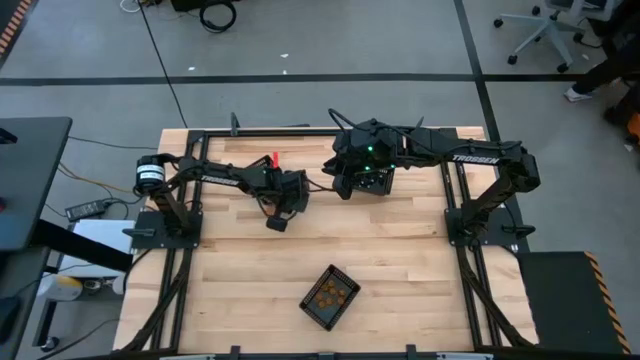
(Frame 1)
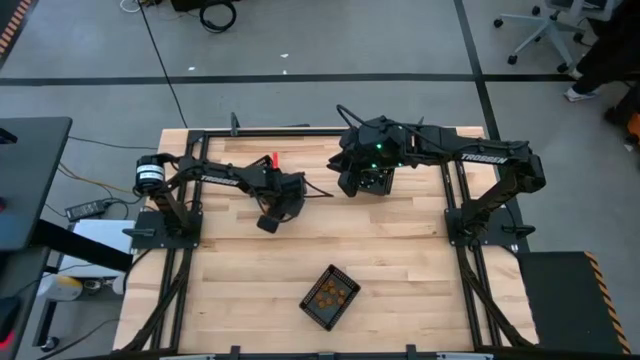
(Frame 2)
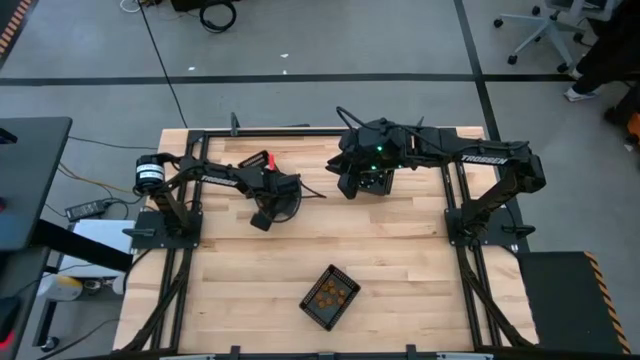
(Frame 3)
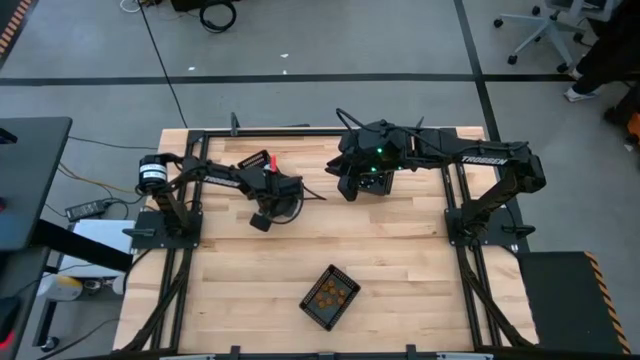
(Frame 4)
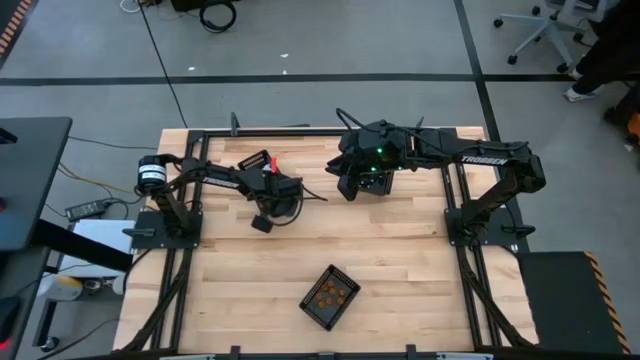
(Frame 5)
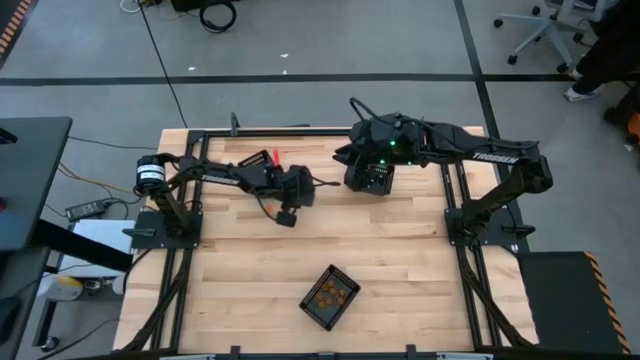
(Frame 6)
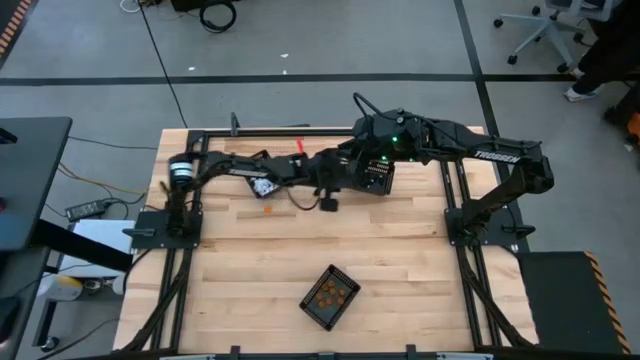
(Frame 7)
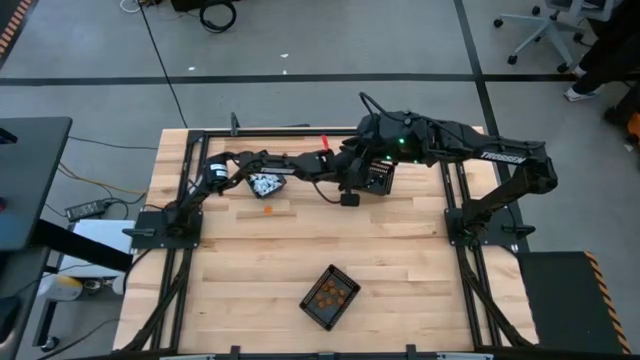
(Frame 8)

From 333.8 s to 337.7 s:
Task: Sort Halloween decoration
Put the black skeleton toy into the top right black basket

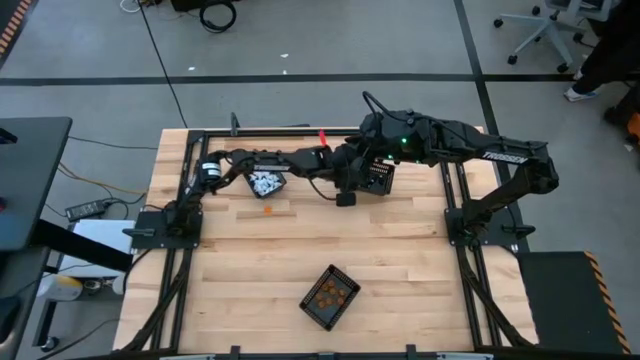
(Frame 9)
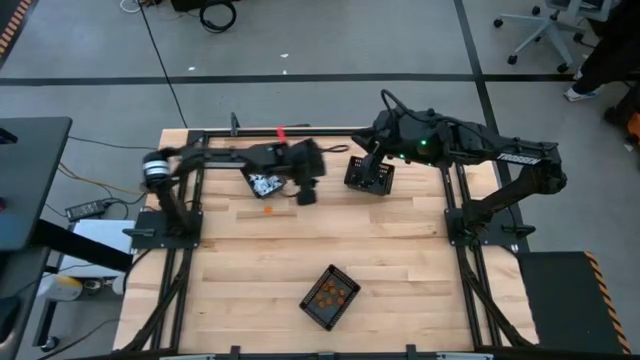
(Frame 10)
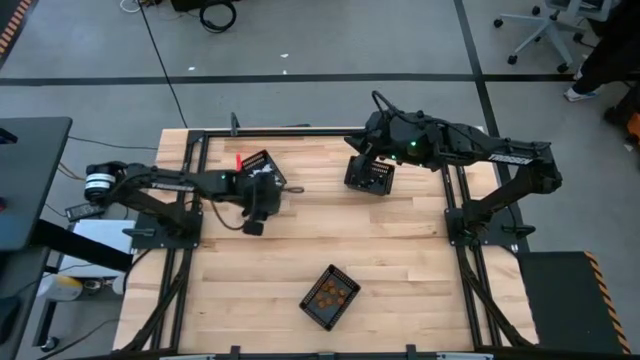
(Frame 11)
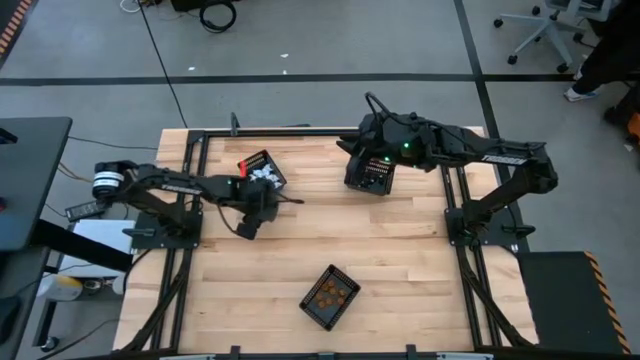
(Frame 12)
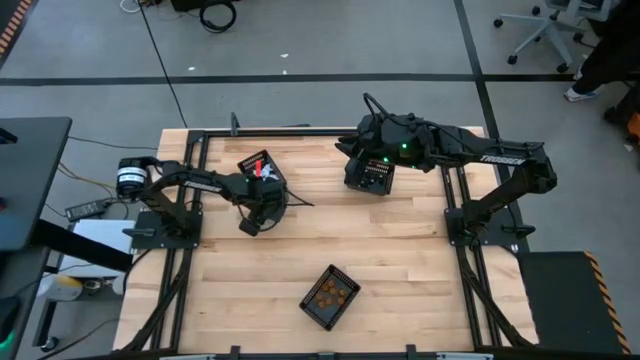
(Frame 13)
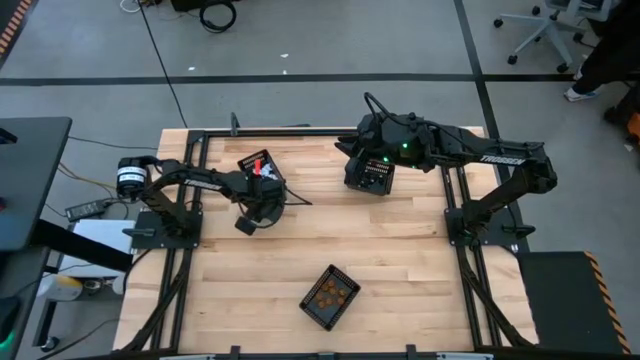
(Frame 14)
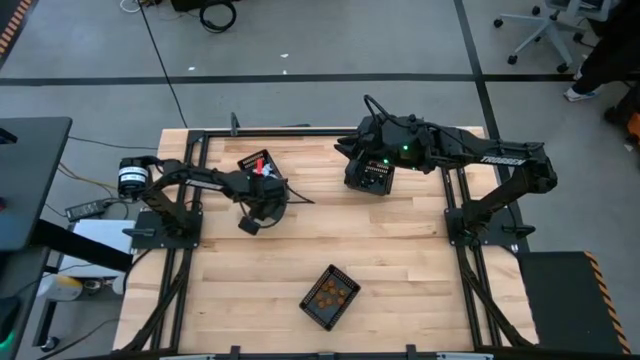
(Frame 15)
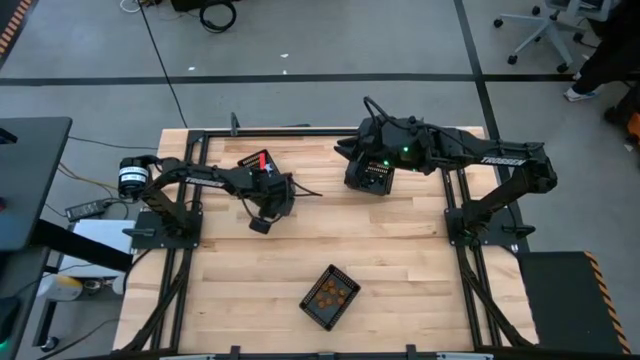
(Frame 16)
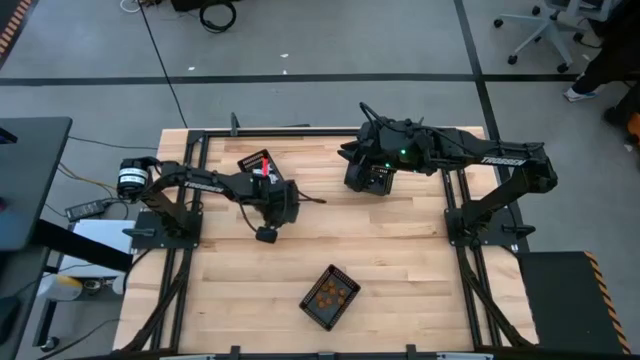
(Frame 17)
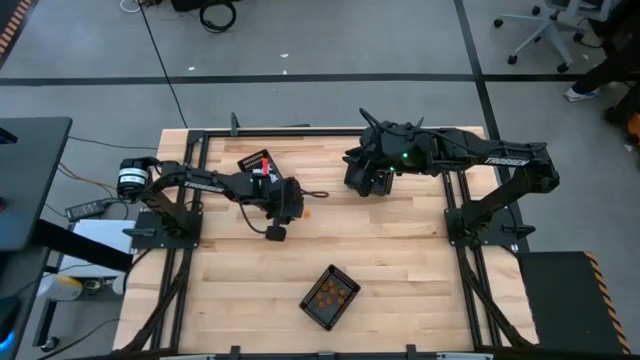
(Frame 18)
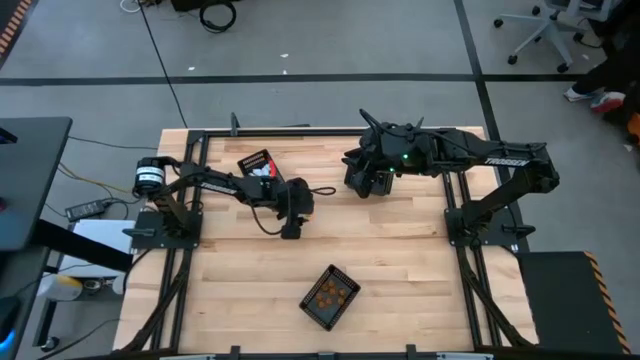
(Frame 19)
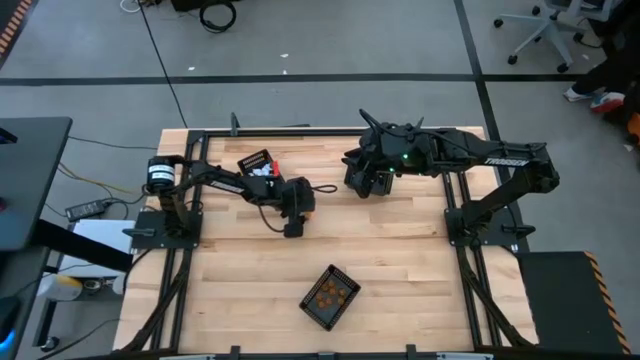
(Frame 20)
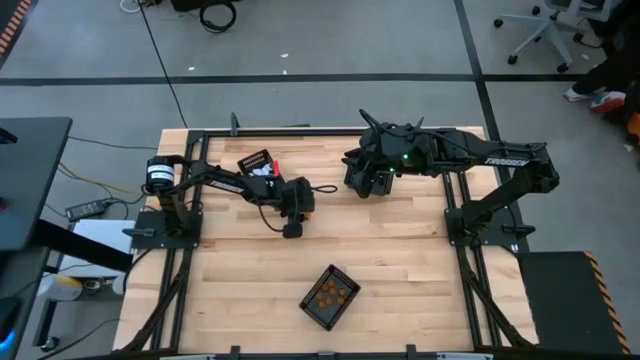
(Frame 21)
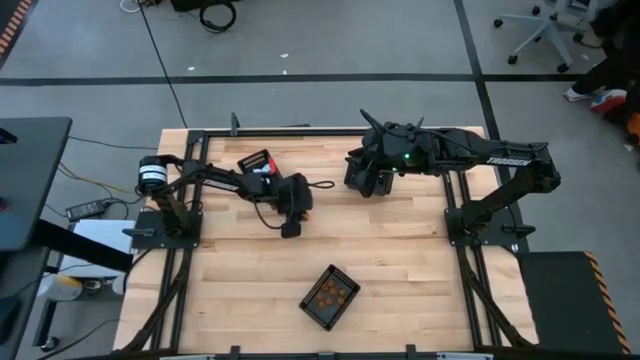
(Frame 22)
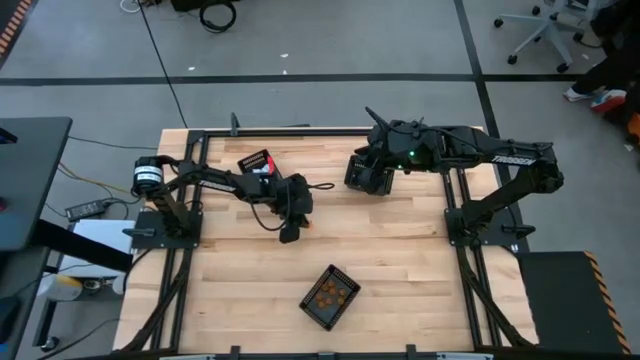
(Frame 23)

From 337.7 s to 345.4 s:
Put the orange pumpkin toy into the bottom black basket

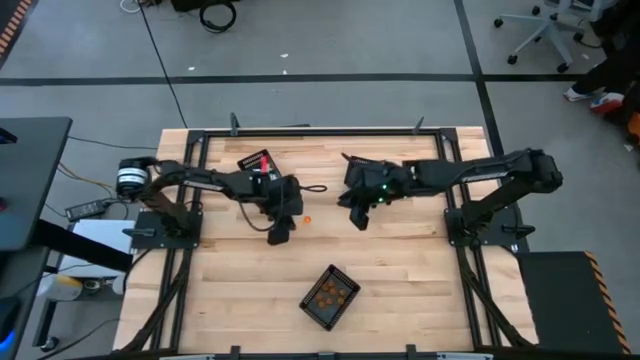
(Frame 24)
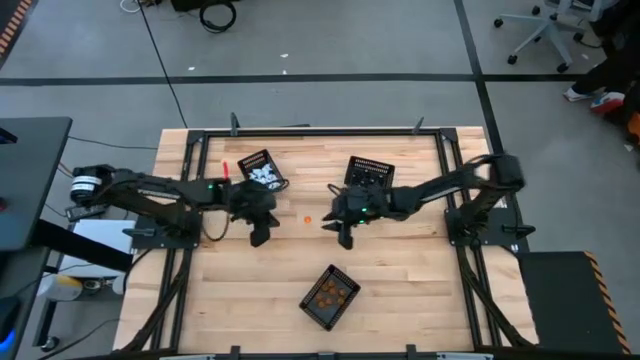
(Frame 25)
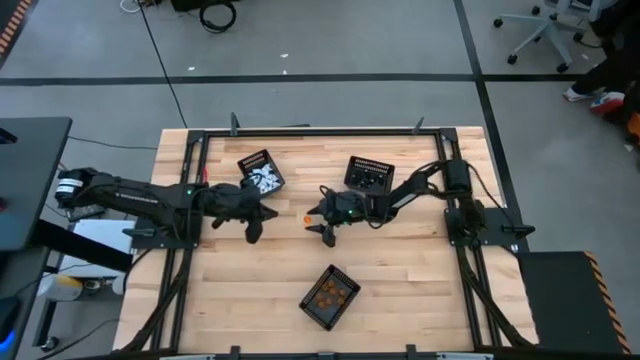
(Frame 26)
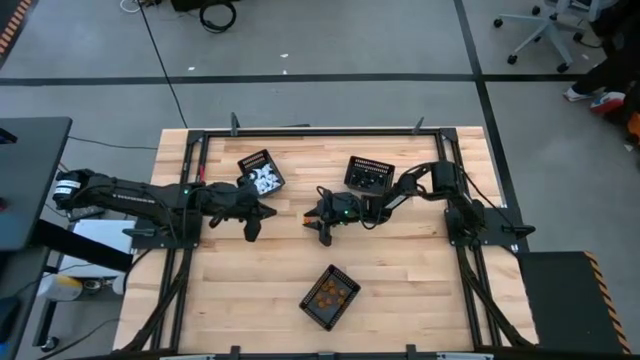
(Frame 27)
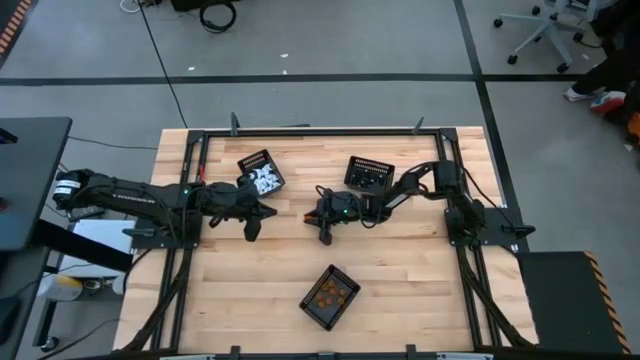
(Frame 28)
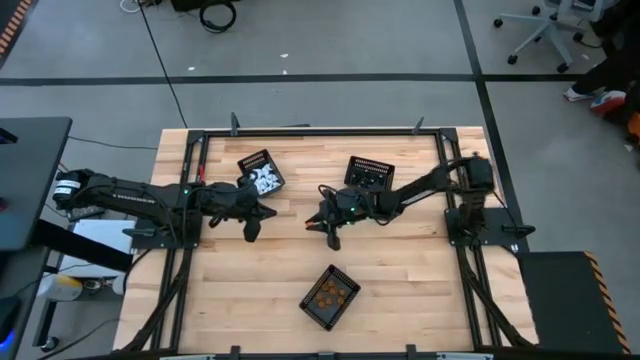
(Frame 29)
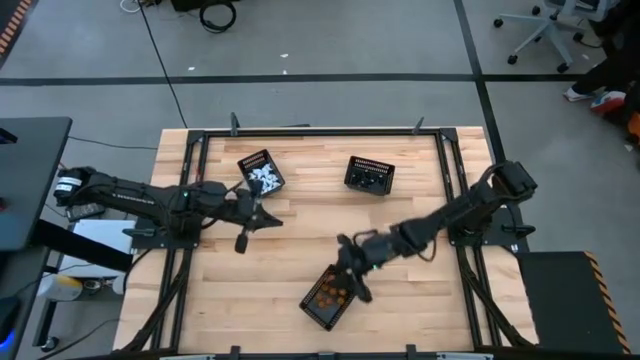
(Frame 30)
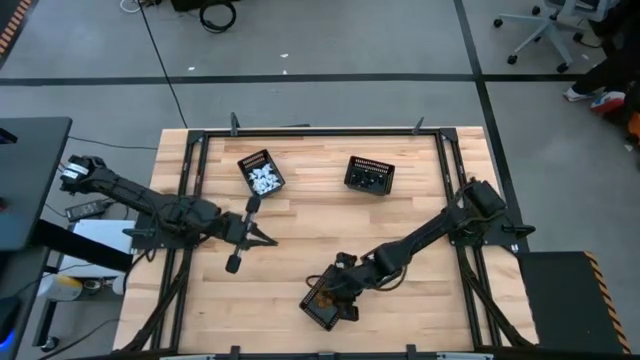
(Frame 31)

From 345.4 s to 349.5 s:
Put the orange pumpkin toy into the bottom black basket

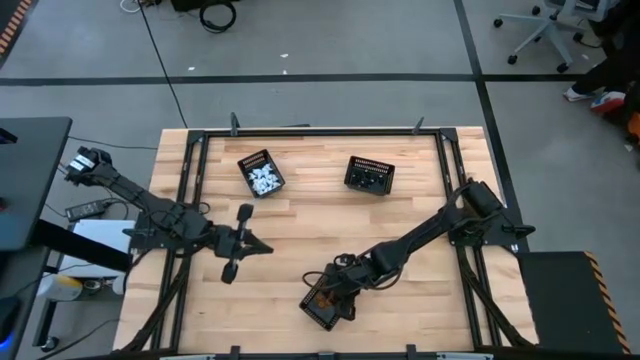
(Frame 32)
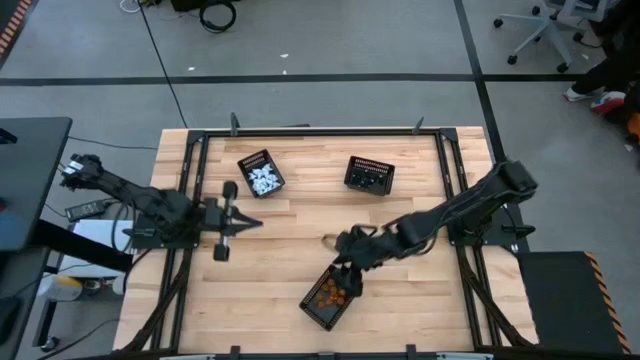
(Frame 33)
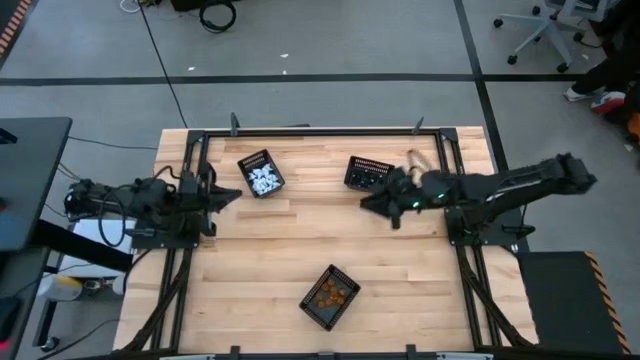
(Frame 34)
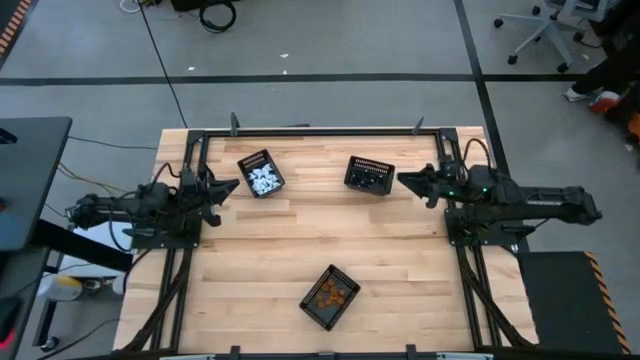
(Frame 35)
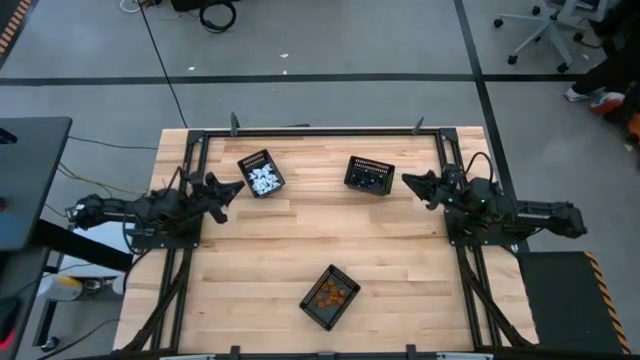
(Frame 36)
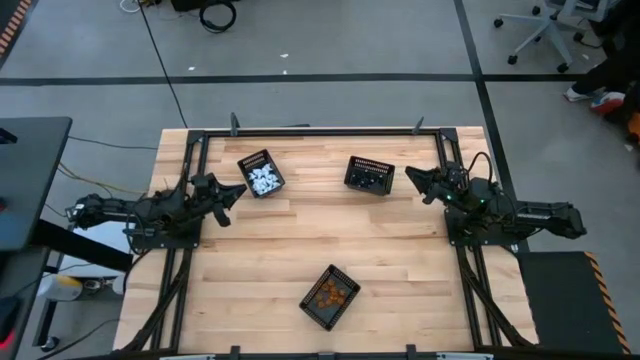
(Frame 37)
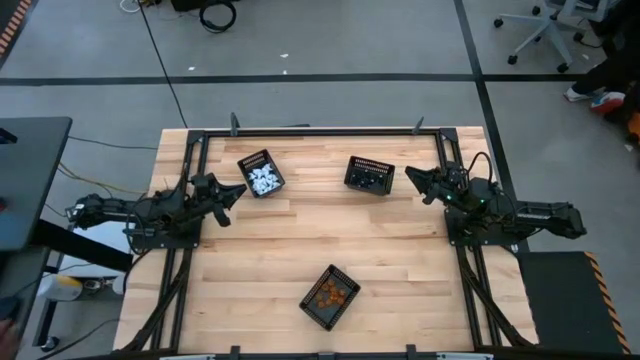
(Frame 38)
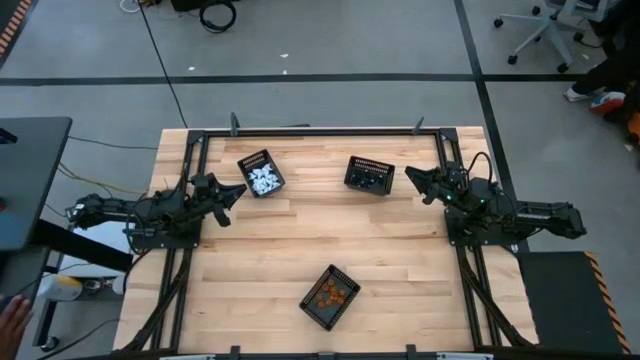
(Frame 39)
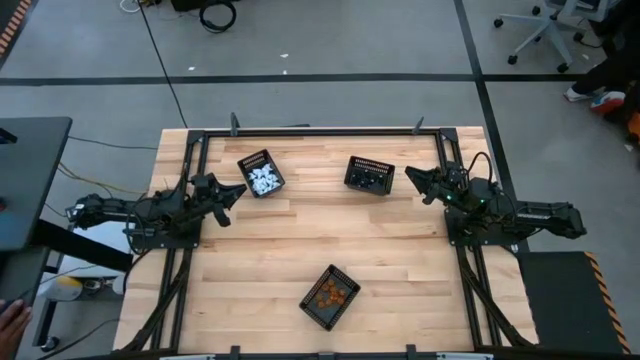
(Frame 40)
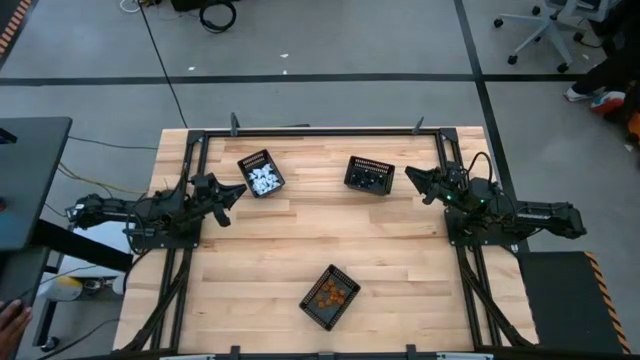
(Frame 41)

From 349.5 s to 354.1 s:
Return to Home Position

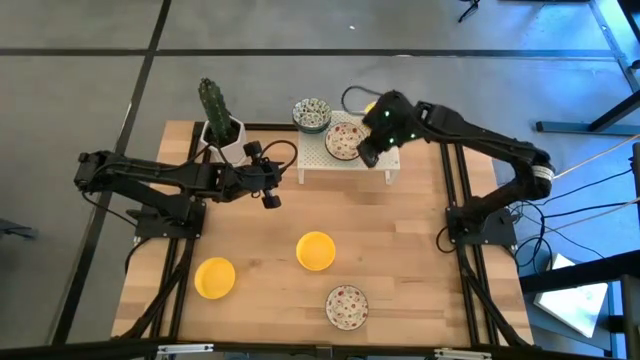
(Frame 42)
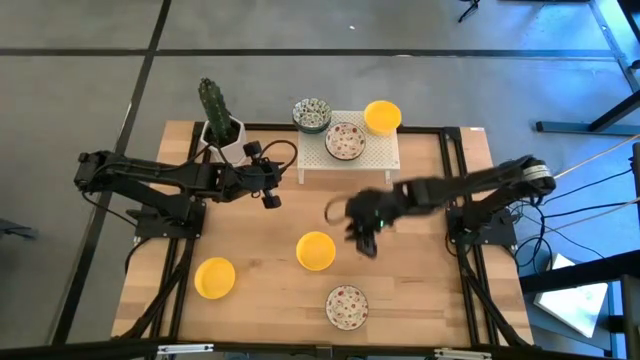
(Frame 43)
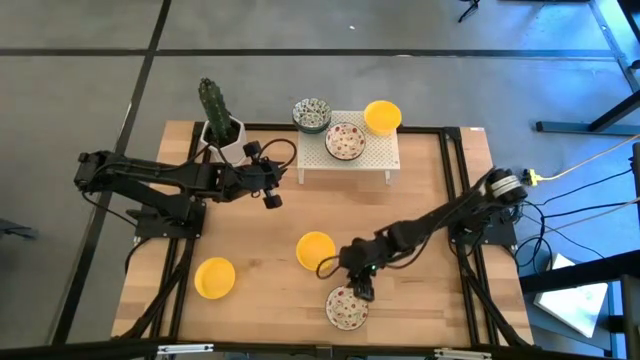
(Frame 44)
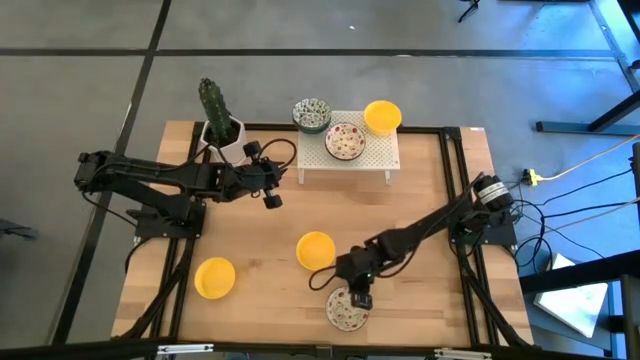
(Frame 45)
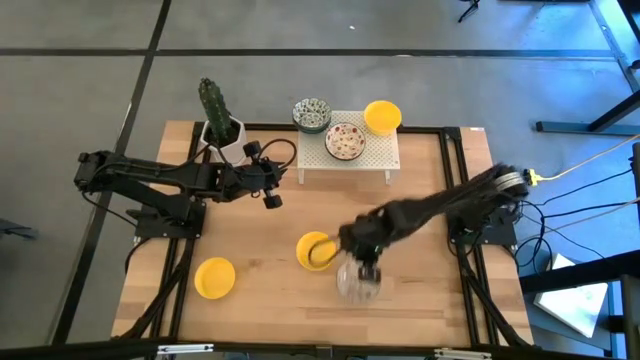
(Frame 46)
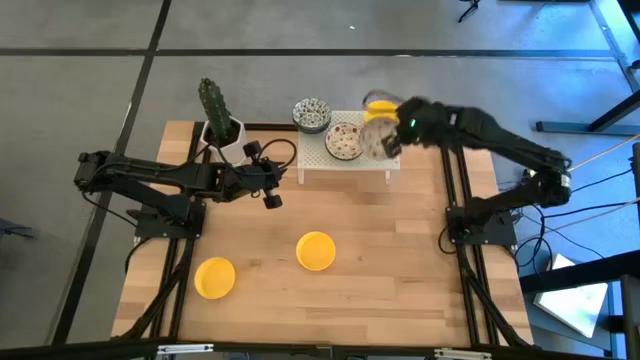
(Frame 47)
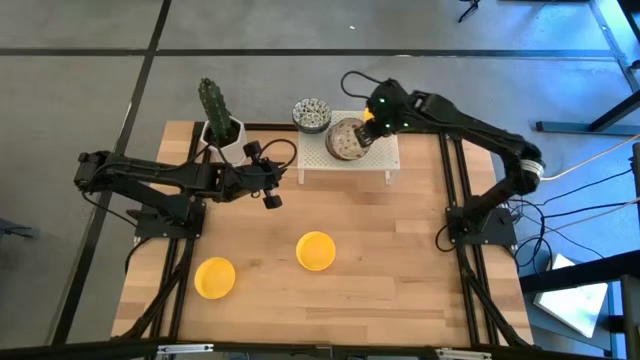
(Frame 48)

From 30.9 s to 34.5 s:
Task: Pick & Place Mini bowls
Stack the red white bowl on top of the red white bowl on the shelf
